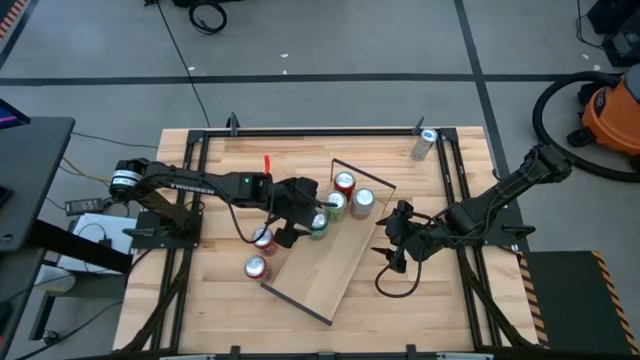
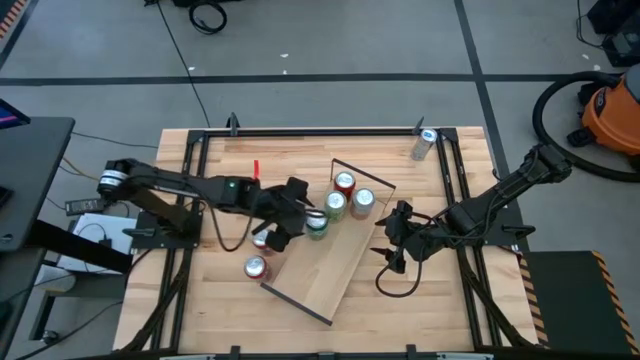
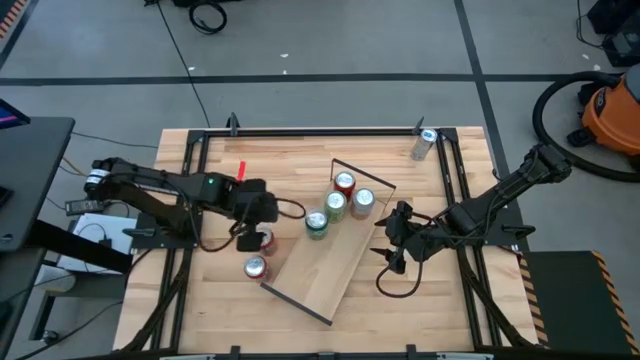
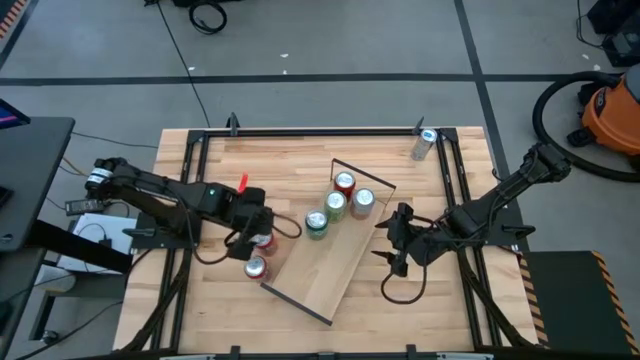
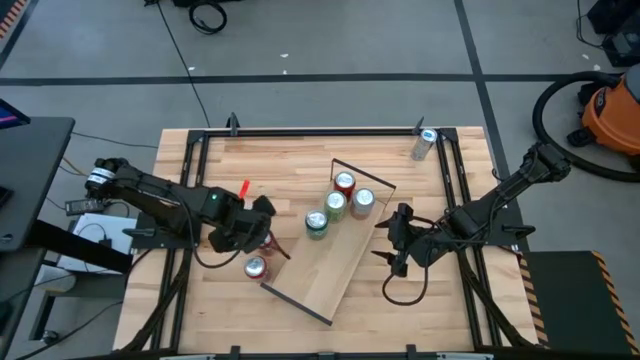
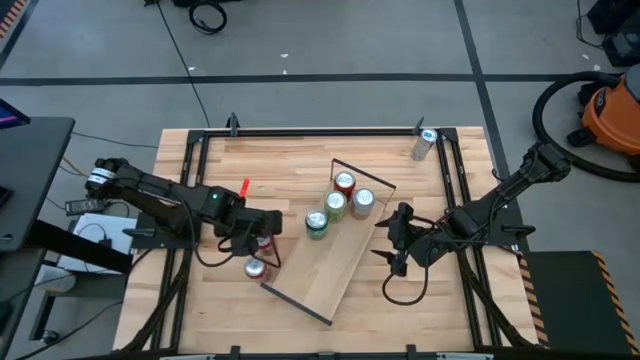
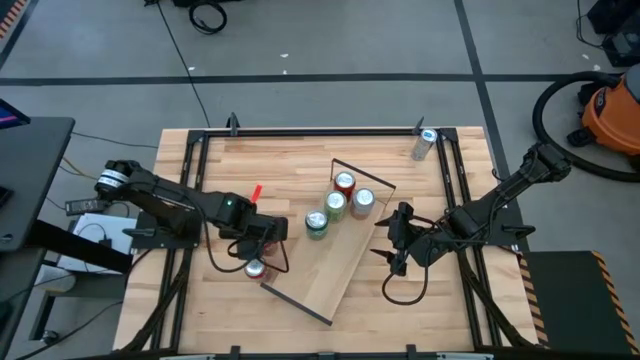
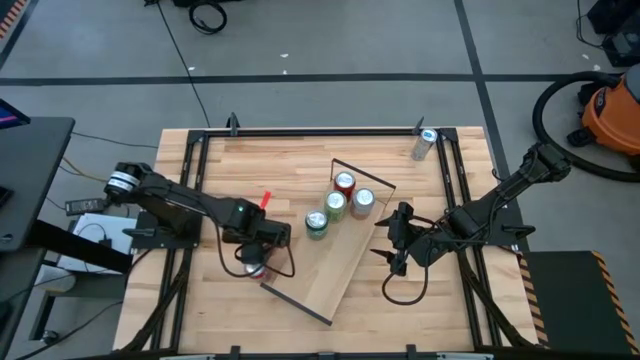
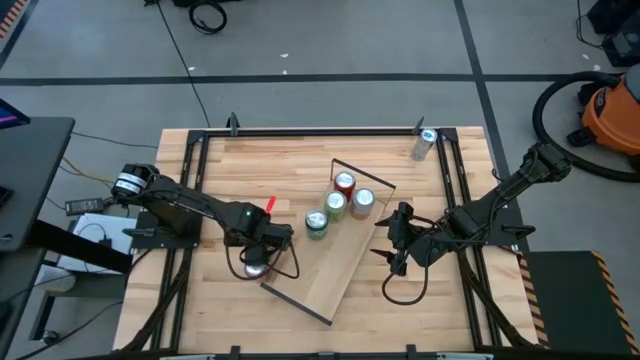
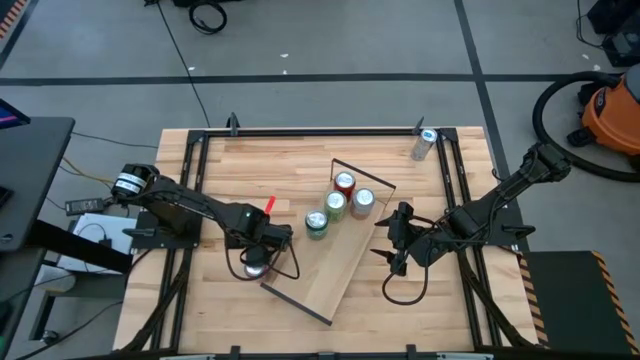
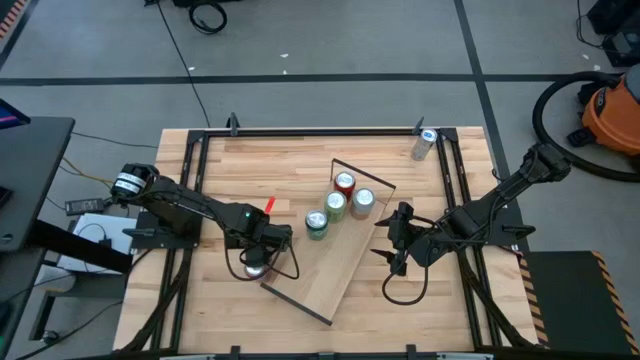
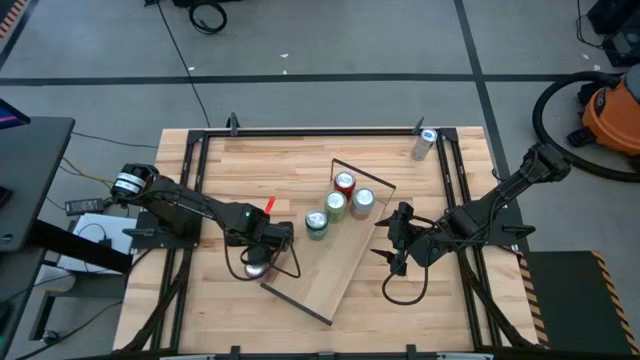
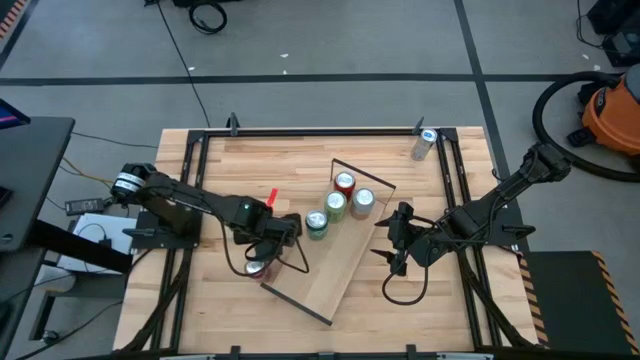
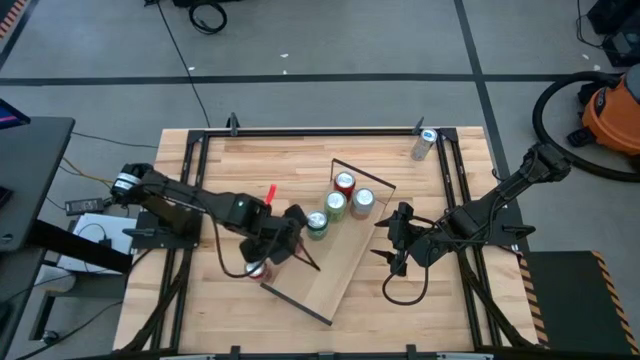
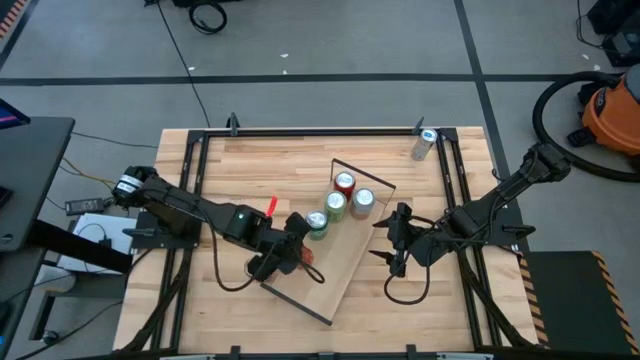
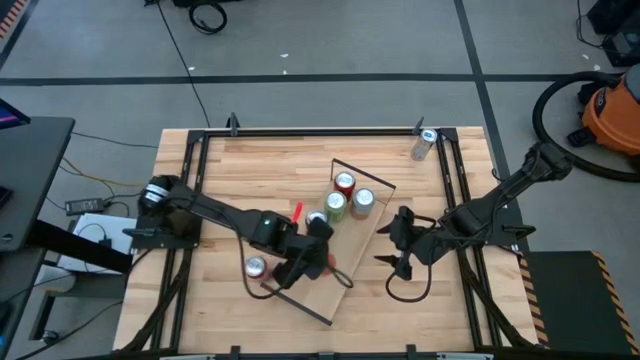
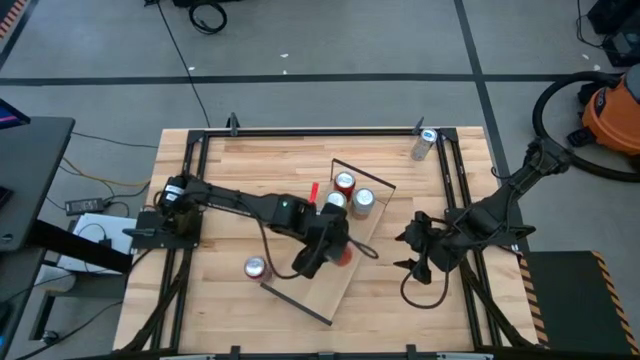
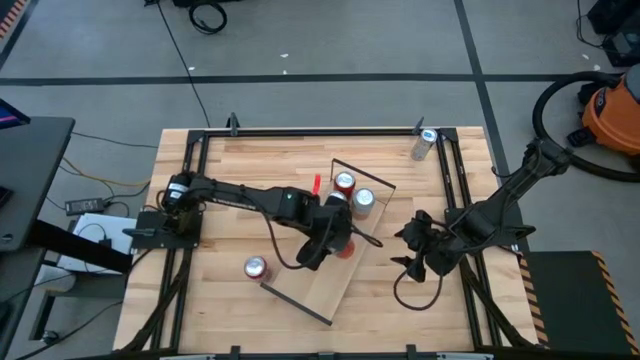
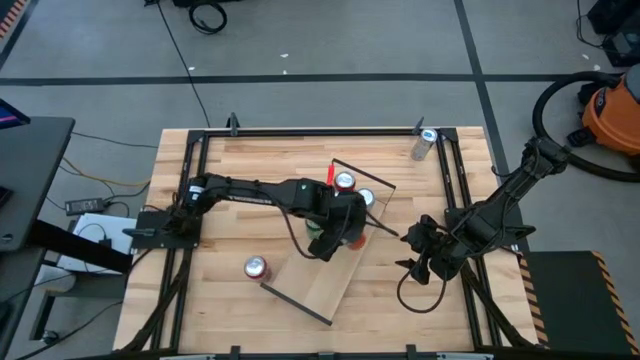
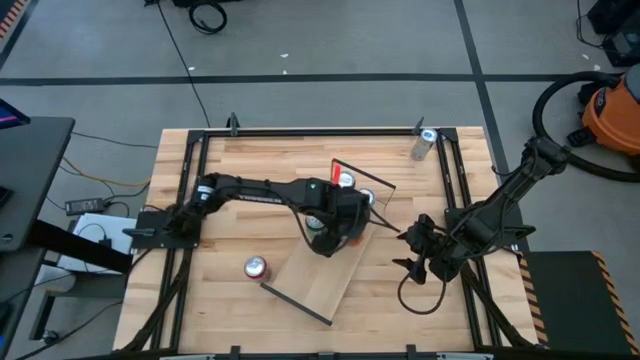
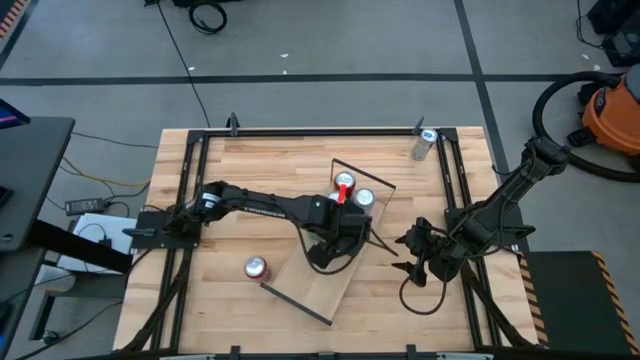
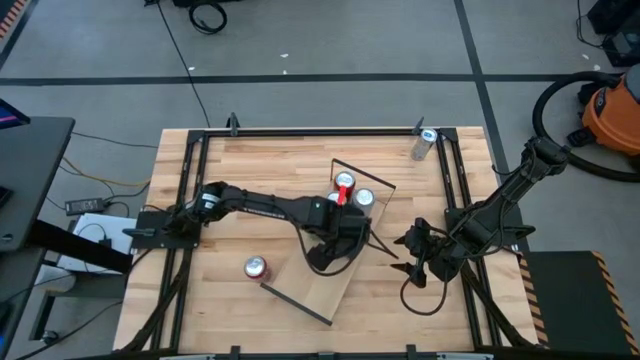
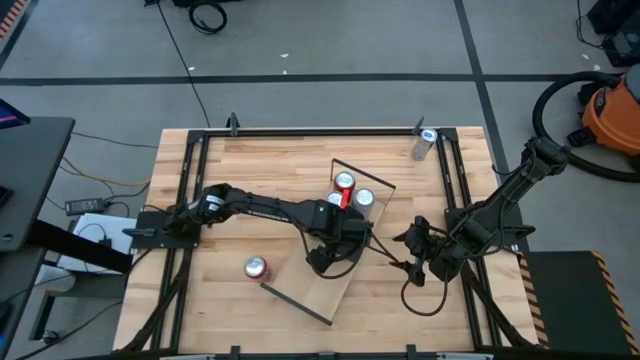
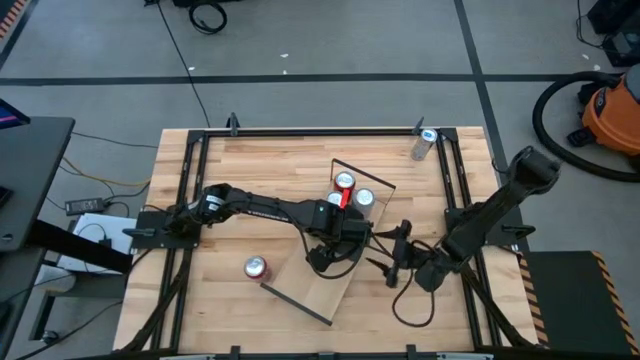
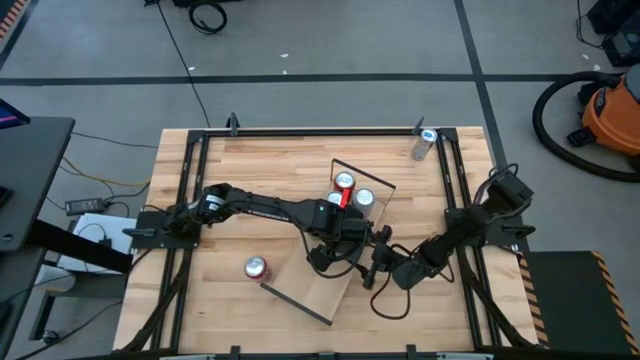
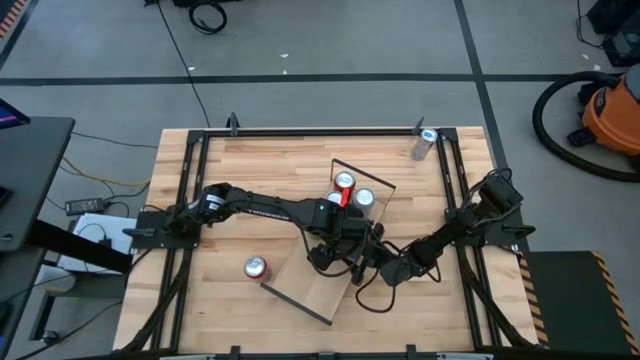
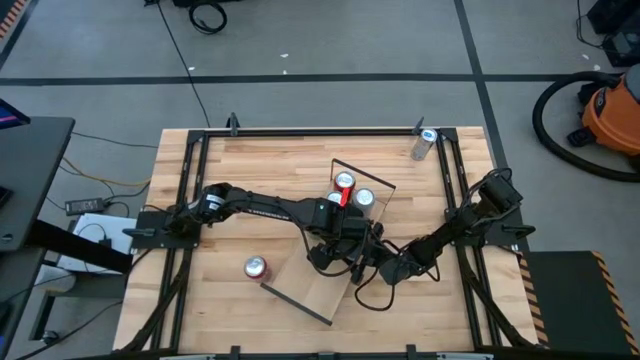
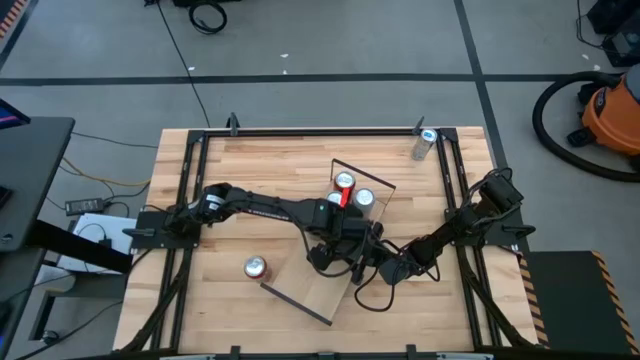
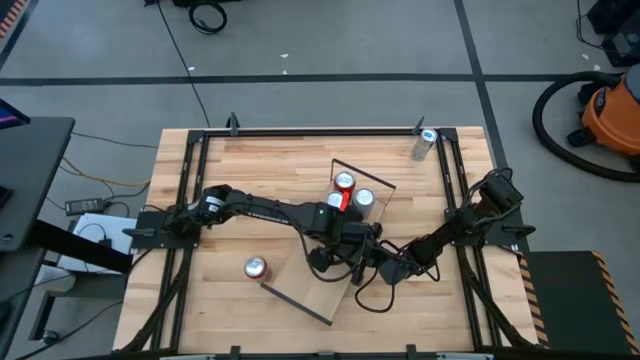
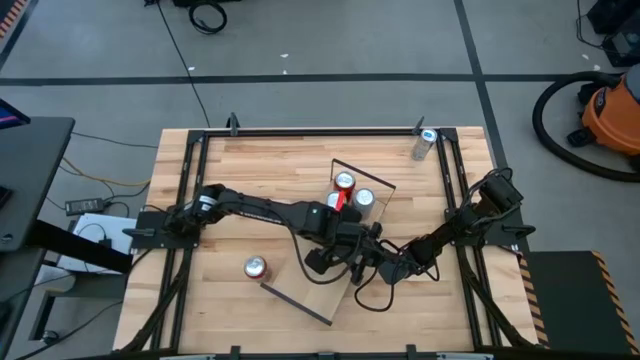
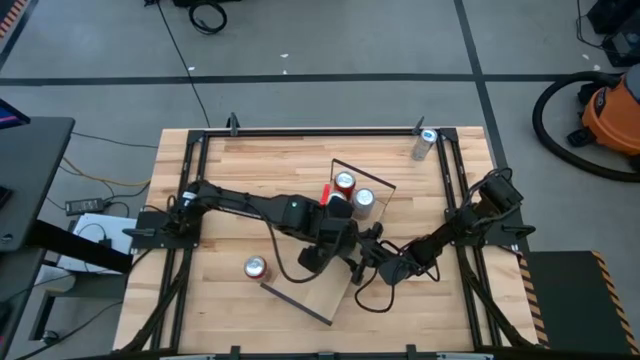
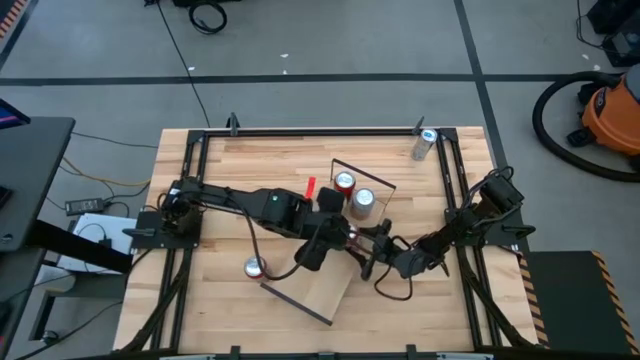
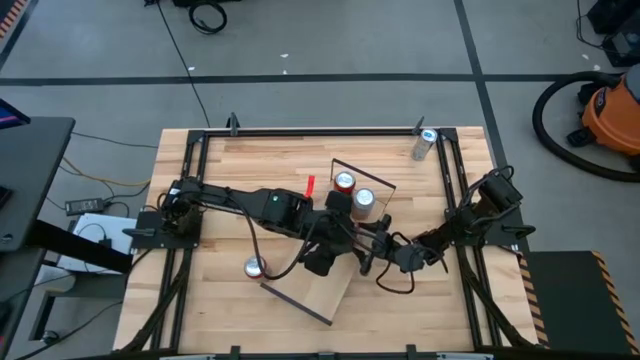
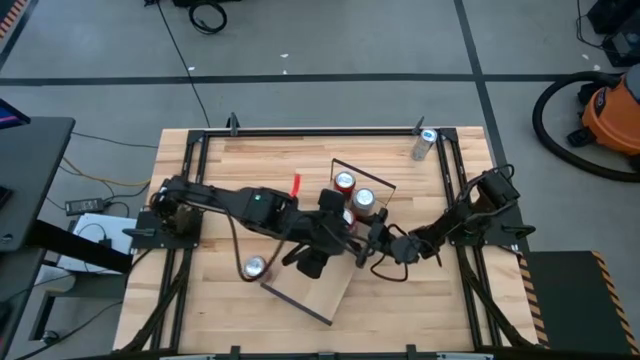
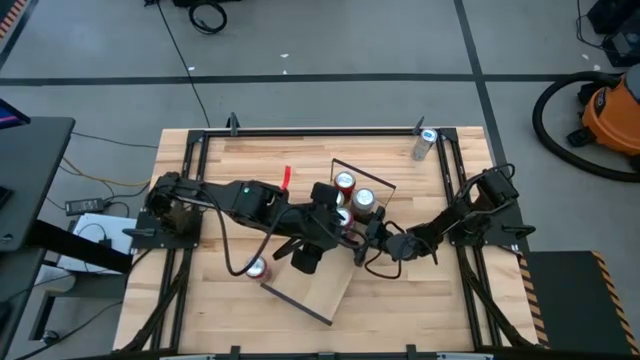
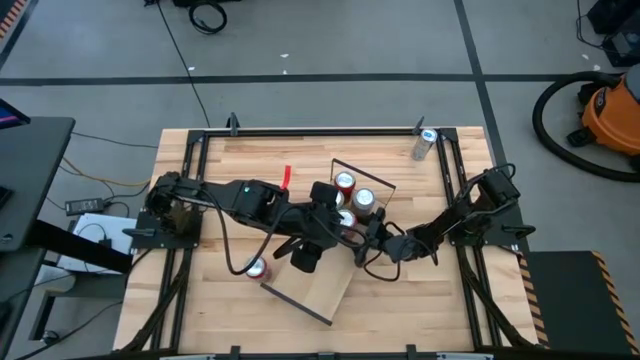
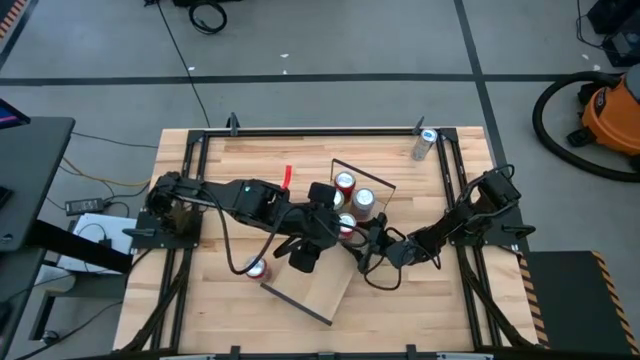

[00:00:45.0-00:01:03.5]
Task: Place canned beverage on shelf
Put the top red soda can on the shelf

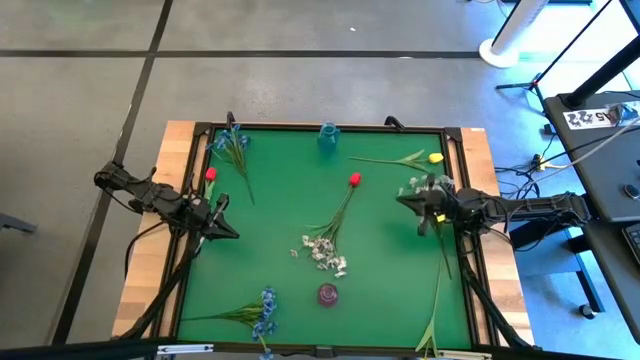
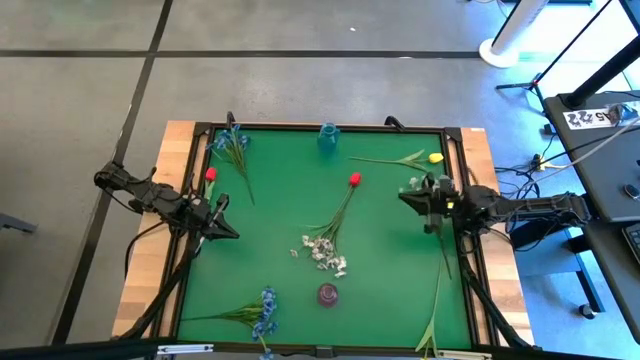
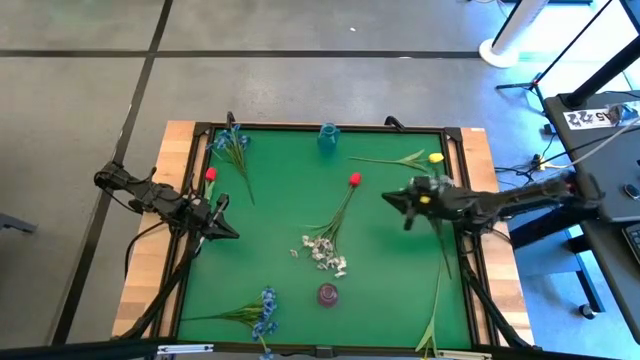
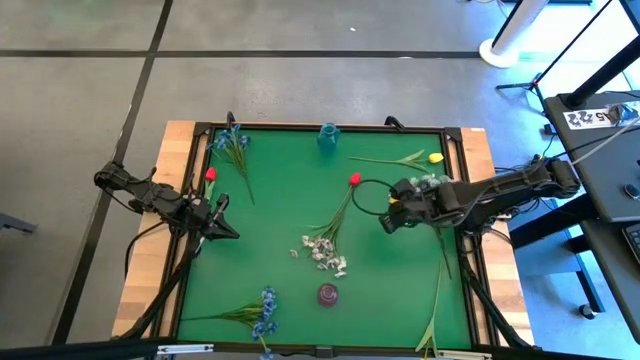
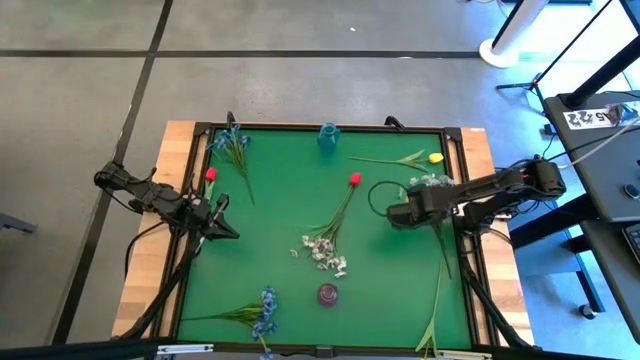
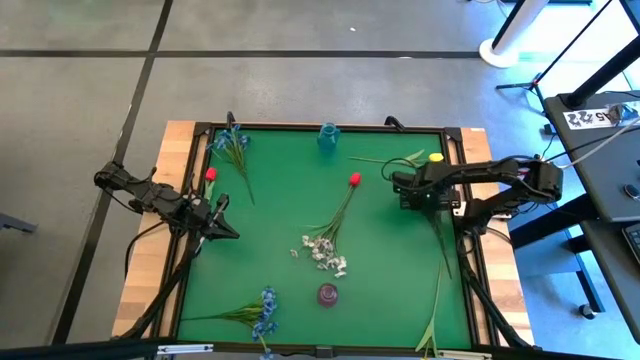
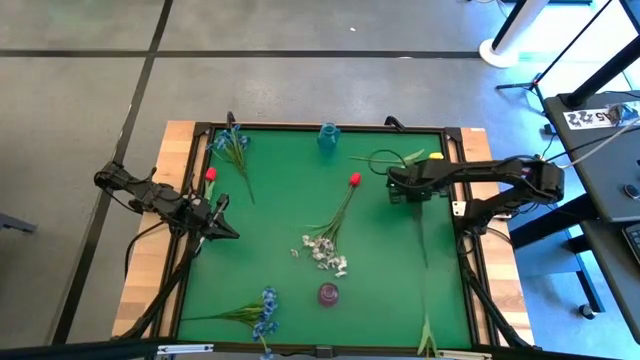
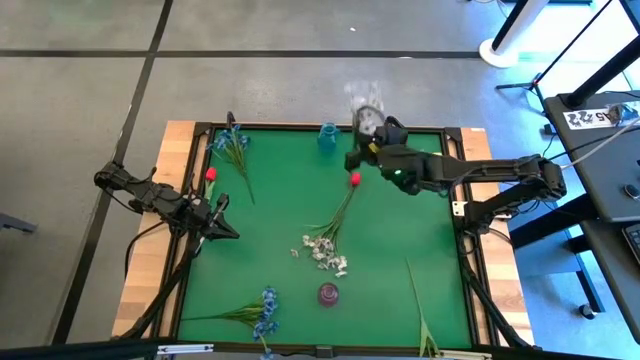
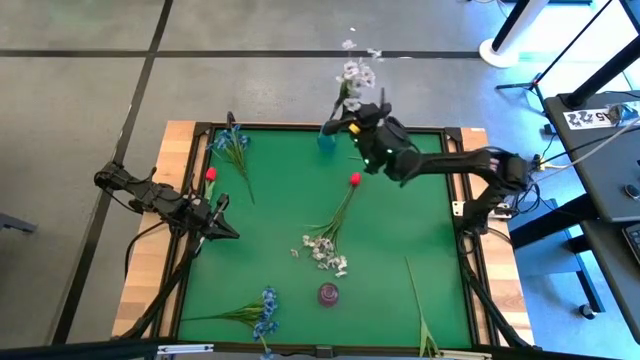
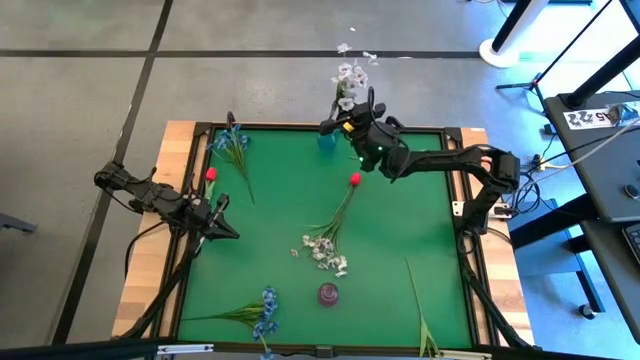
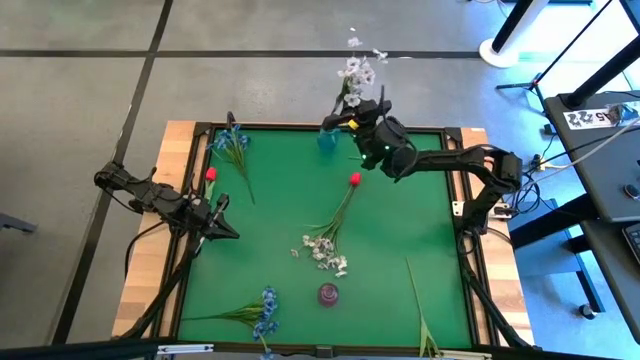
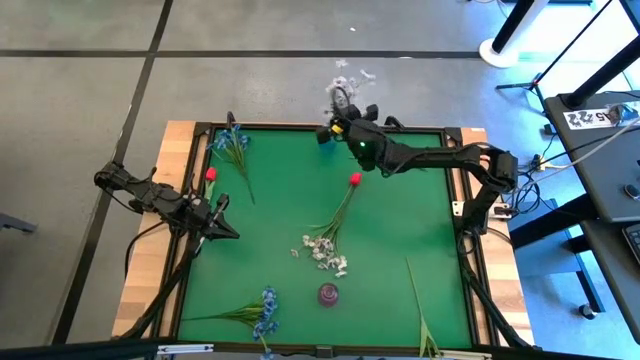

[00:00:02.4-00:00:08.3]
Task: Sort flowers into vase by color
Put the right white flowers into the blue flower vase
